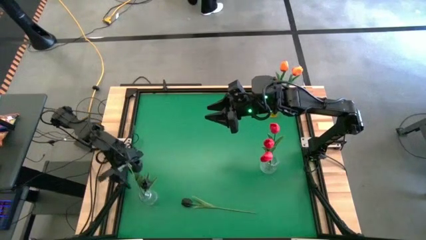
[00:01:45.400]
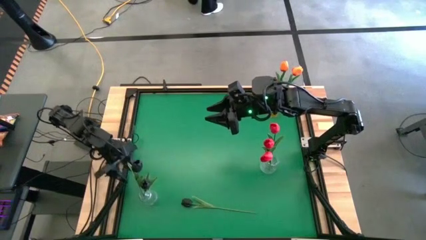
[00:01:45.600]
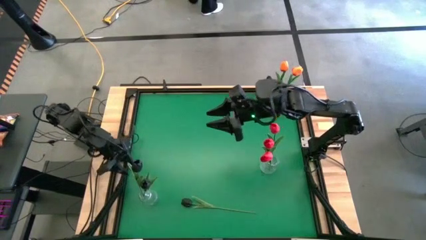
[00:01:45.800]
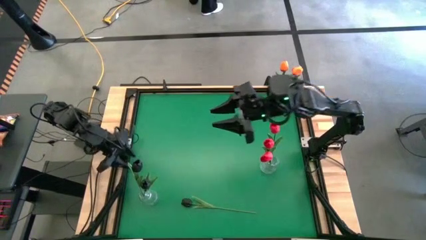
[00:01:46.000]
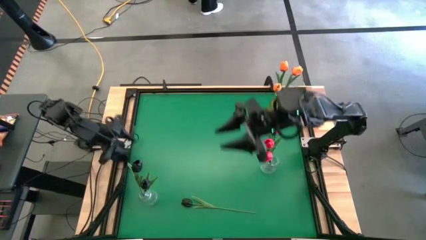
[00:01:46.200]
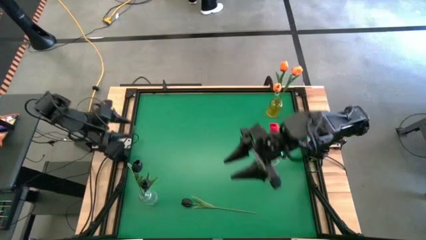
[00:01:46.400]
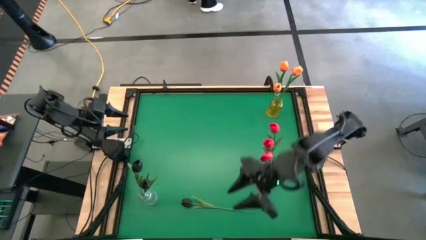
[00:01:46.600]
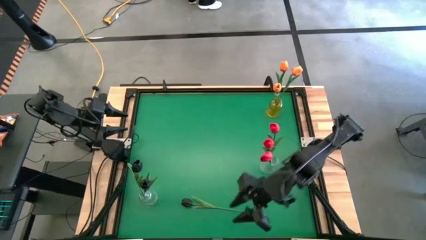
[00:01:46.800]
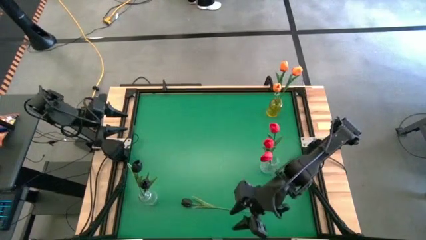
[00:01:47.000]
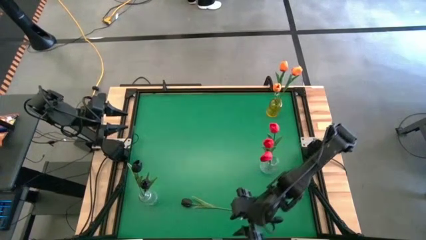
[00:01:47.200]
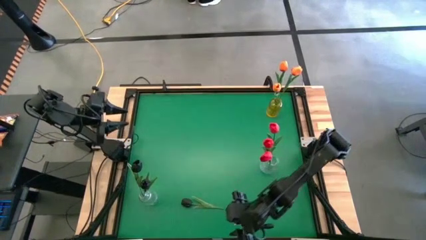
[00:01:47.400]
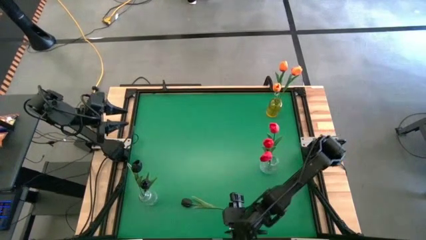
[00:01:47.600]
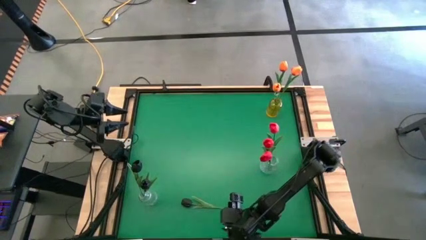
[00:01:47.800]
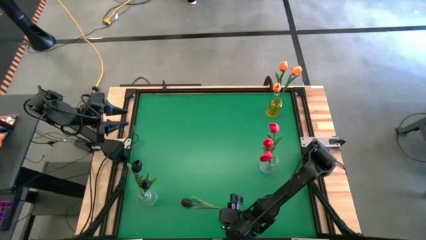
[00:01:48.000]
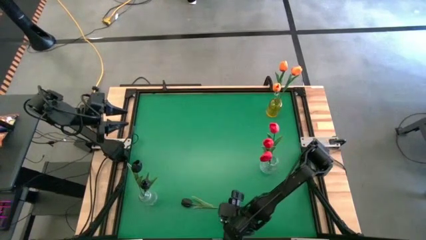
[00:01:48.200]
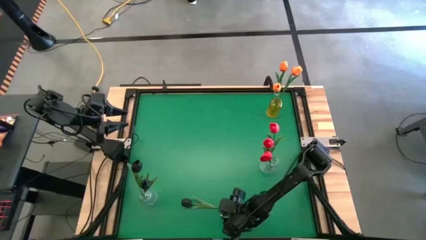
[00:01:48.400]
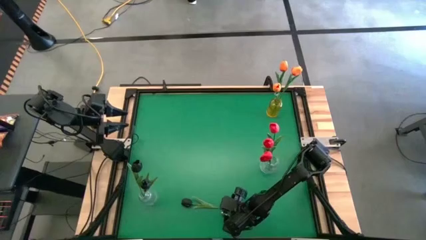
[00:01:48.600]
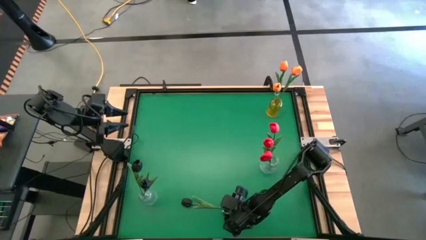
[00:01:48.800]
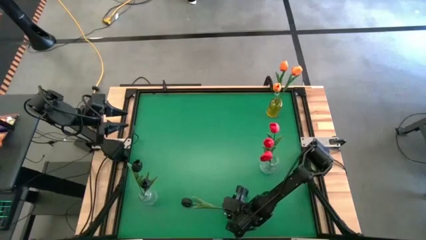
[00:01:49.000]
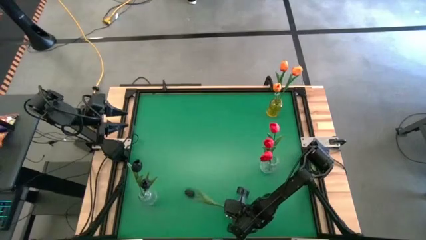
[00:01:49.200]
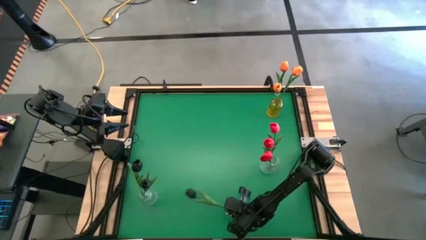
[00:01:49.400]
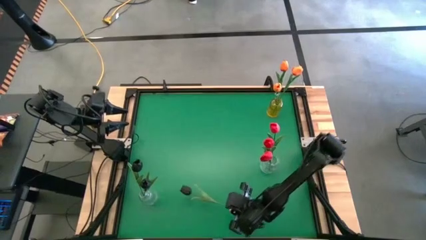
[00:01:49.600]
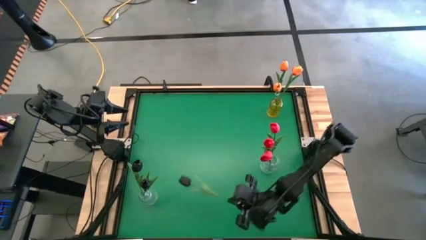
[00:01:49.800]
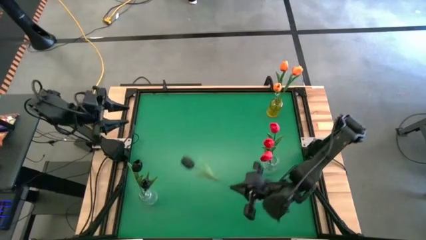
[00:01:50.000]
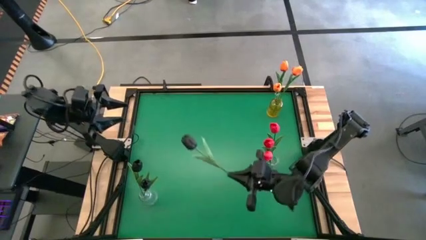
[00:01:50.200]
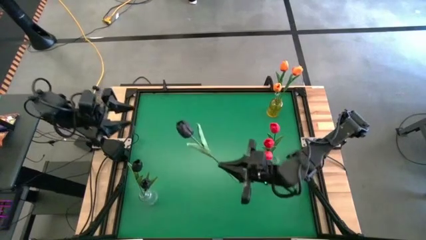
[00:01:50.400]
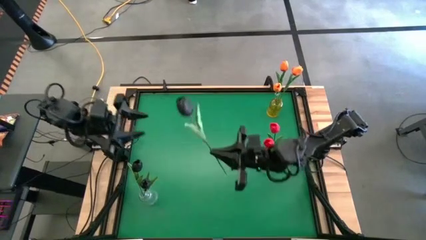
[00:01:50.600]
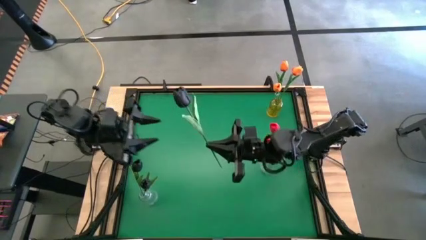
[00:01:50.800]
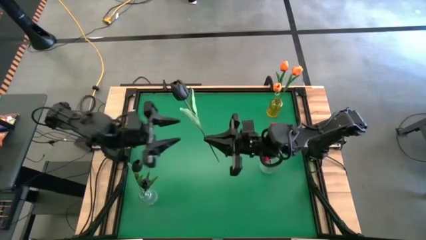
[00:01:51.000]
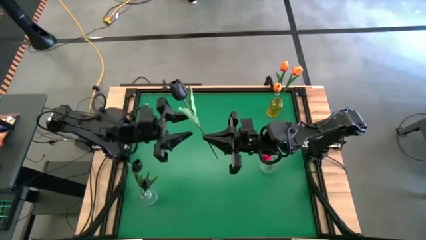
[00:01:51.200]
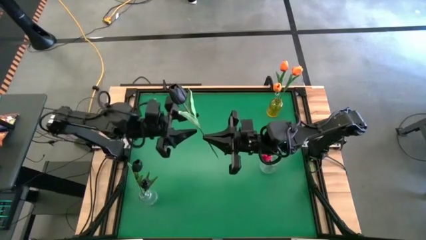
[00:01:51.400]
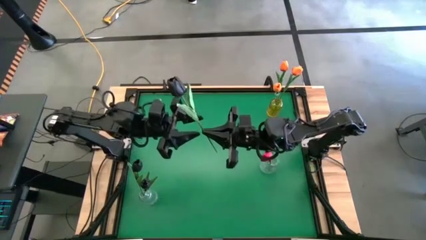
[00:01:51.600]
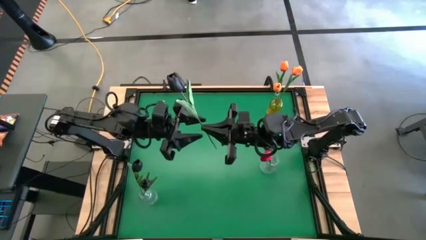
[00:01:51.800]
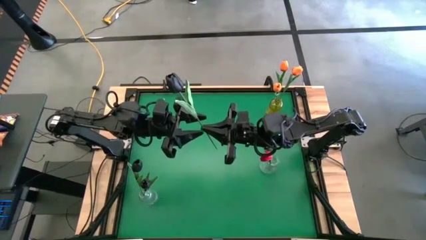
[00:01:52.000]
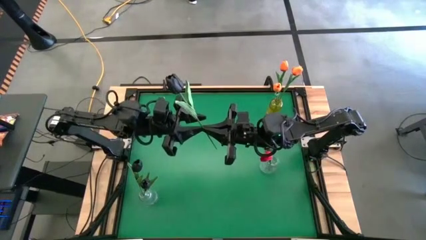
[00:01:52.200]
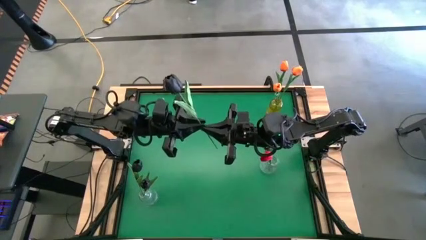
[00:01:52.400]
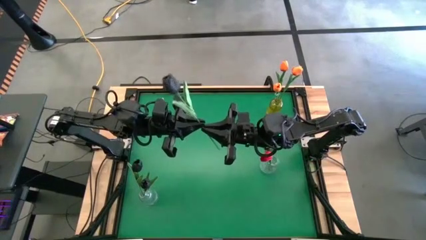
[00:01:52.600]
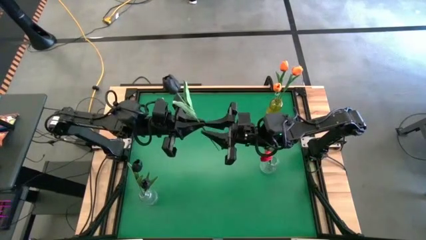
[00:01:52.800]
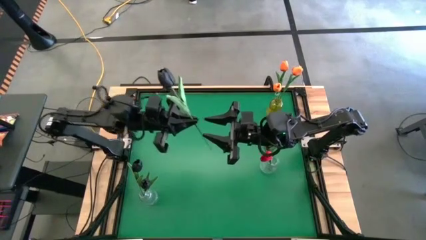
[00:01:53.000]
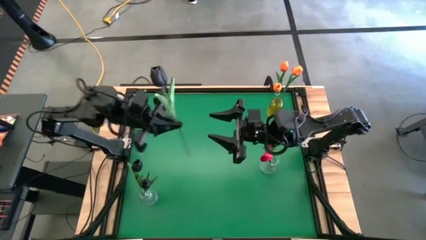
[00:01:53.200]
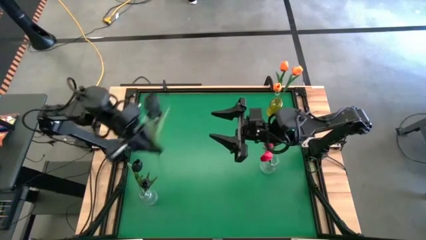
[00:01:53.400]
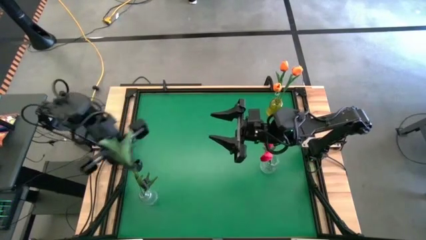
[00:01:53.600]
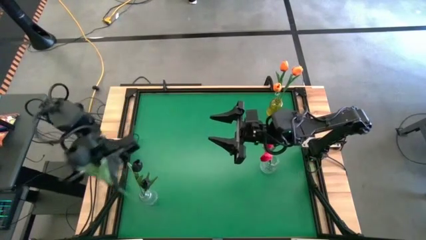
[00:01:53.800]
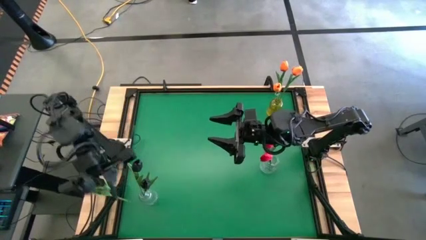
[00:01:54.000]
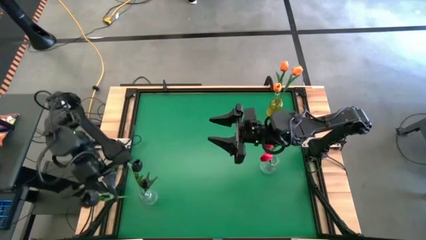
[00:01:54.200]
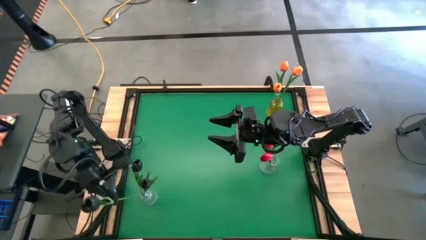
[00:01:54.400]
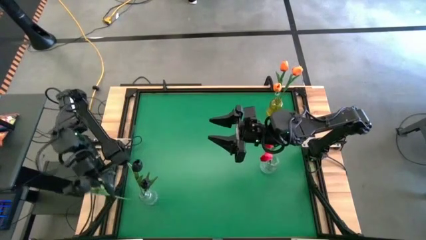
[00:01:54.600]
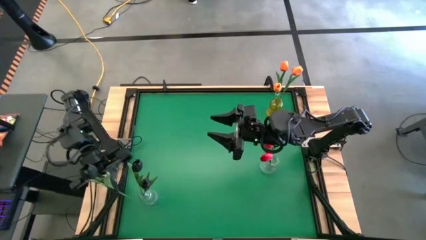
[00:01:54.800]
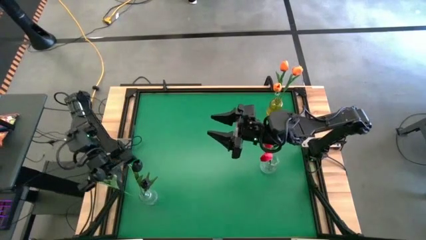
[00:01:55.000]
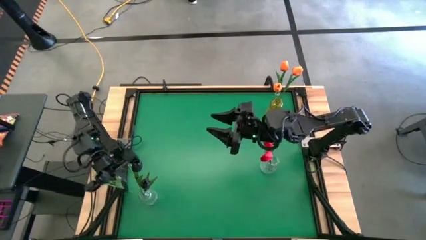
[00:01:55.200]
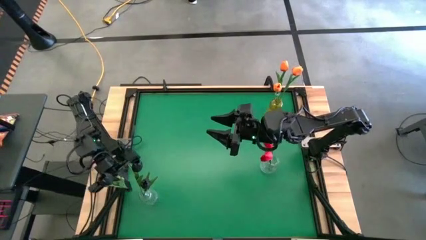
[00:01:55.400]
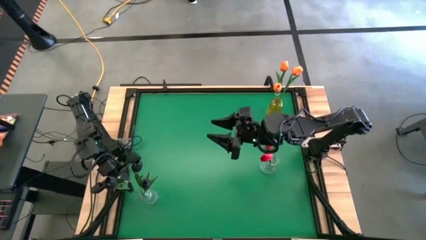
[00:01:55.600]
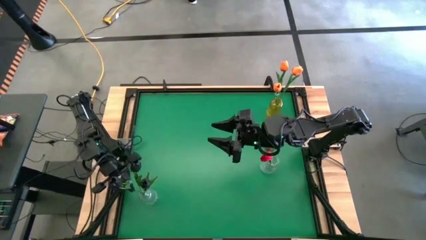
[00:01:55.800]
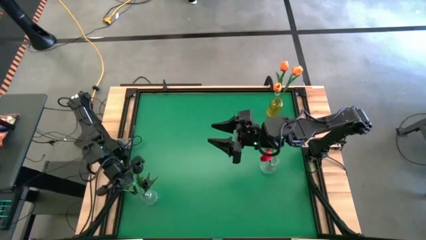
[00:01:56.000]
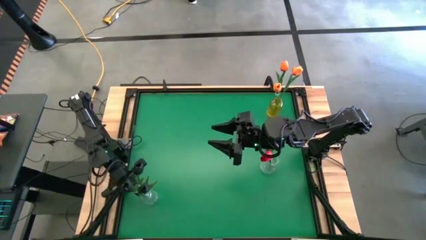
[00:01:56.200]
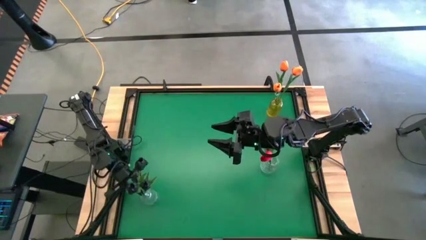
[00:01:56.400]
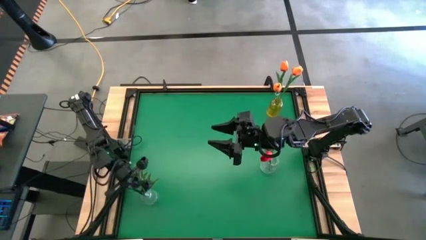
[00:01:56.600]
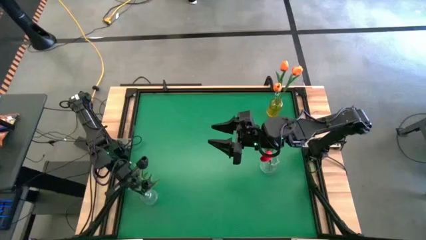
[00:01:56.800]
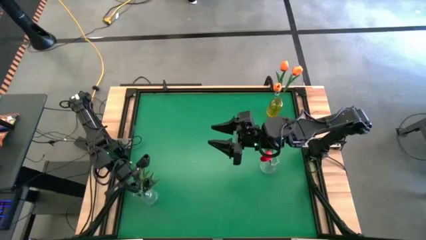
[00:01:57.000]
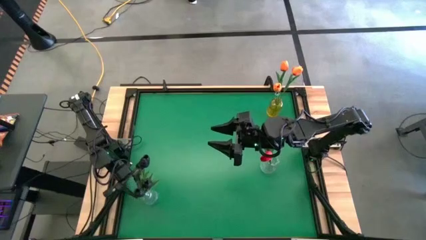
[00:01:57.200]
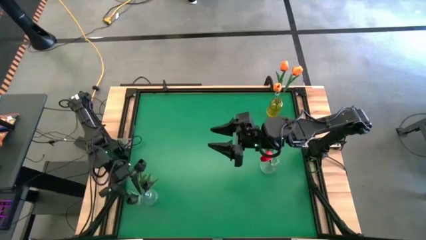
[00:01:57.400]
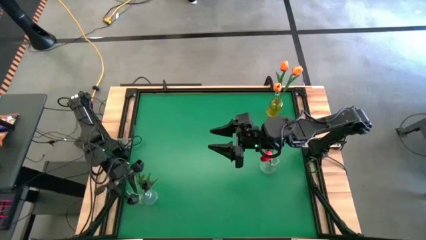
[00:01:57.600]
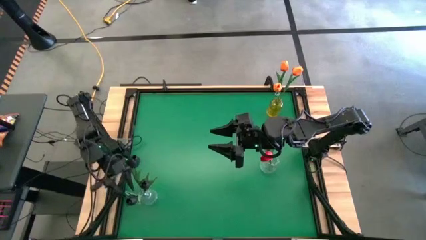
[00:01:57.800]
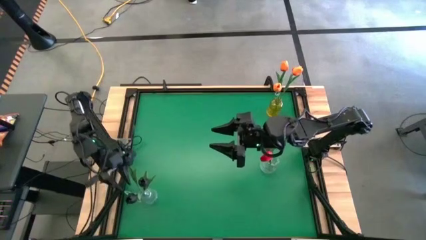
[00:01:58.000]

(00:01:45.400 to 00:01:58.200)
Task: Sort flowers into vase by color
Put the black tulip into the bottom transparent flower vase
